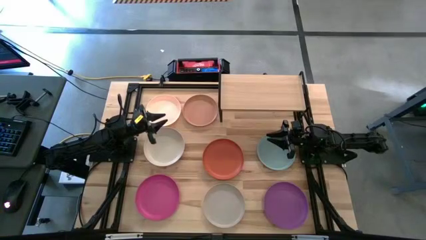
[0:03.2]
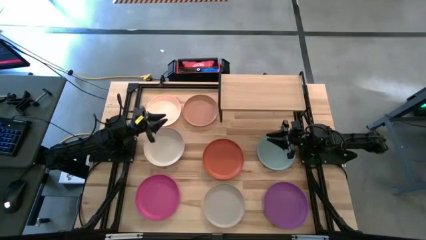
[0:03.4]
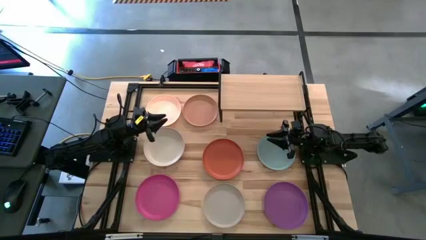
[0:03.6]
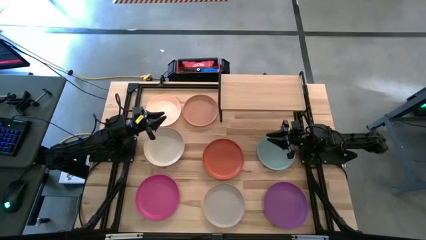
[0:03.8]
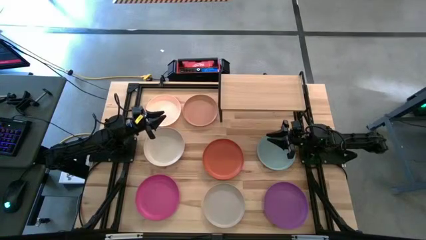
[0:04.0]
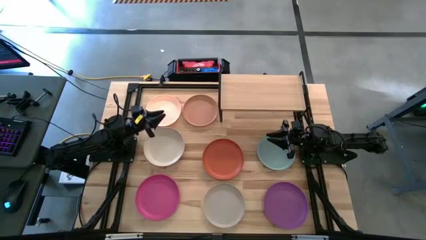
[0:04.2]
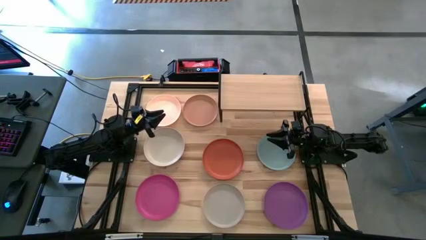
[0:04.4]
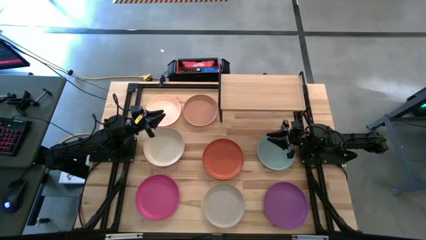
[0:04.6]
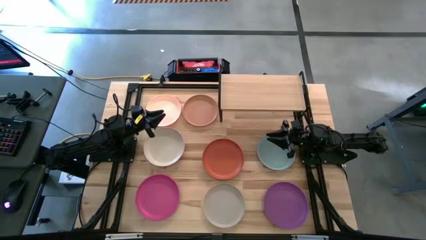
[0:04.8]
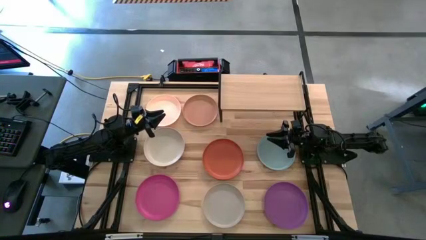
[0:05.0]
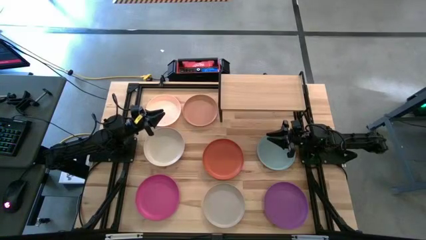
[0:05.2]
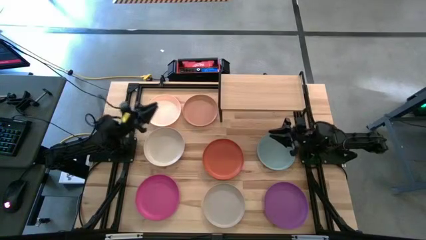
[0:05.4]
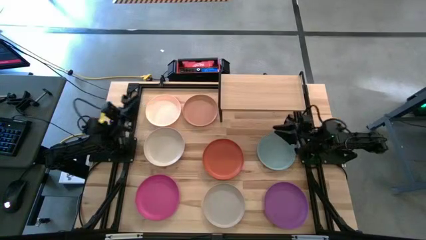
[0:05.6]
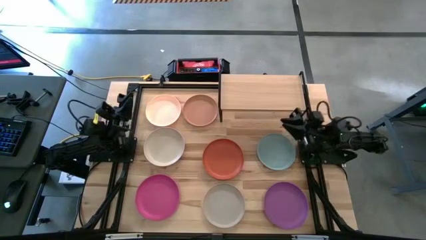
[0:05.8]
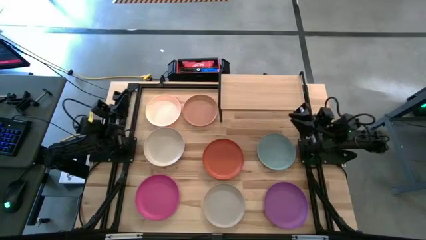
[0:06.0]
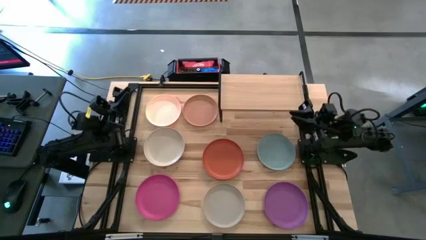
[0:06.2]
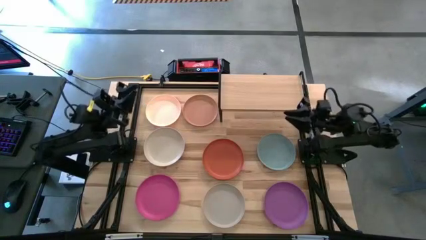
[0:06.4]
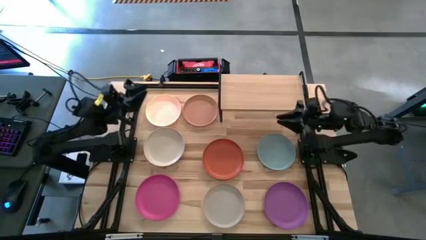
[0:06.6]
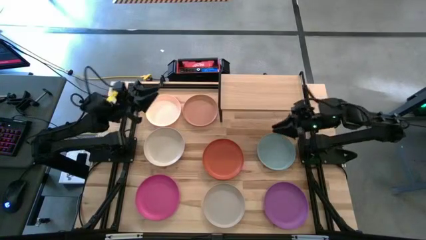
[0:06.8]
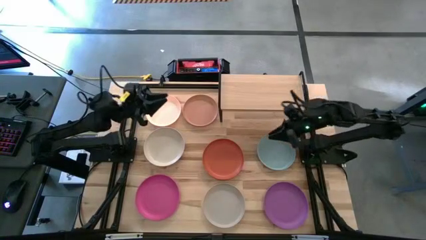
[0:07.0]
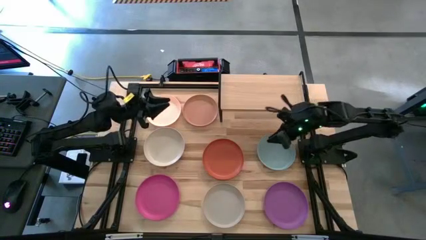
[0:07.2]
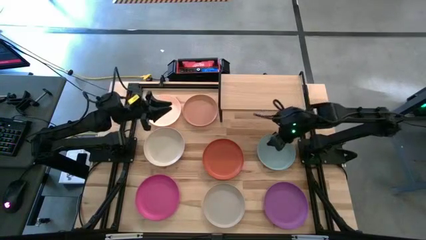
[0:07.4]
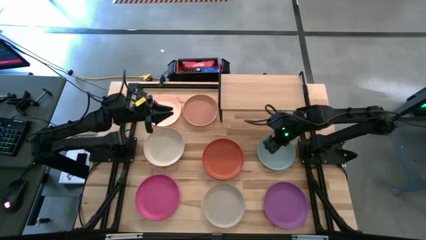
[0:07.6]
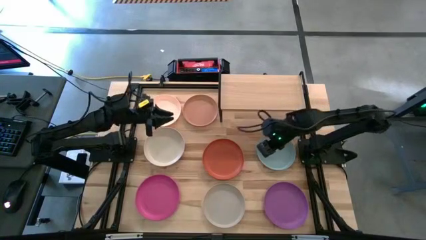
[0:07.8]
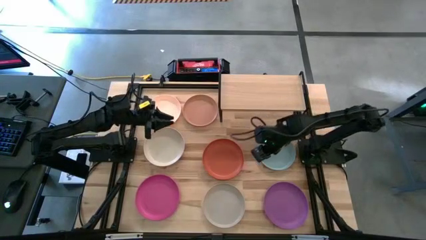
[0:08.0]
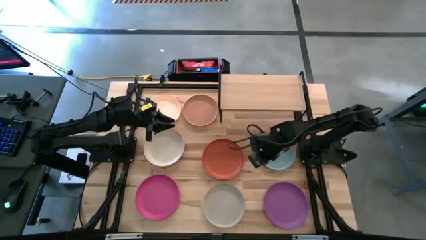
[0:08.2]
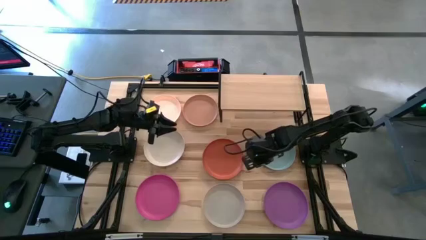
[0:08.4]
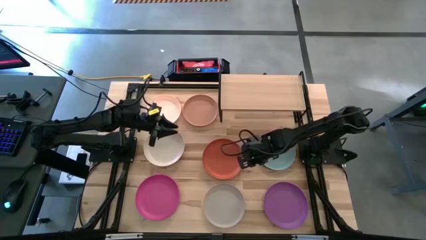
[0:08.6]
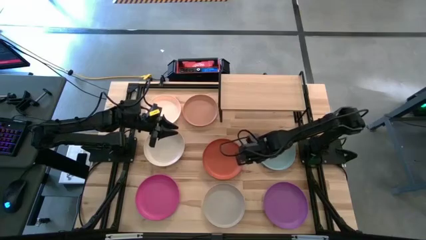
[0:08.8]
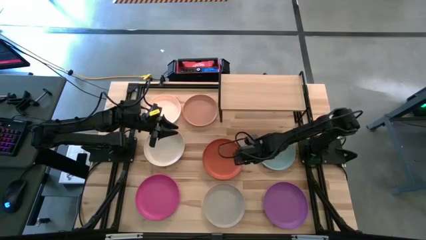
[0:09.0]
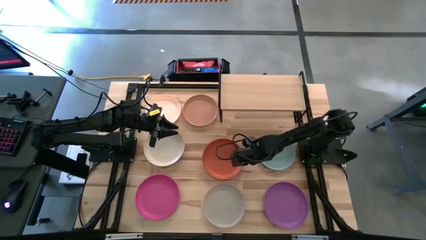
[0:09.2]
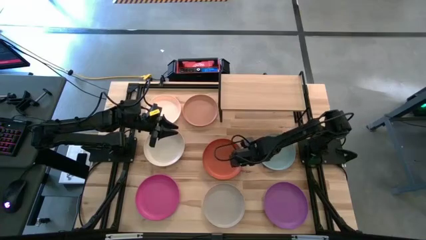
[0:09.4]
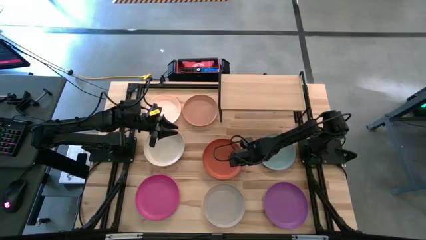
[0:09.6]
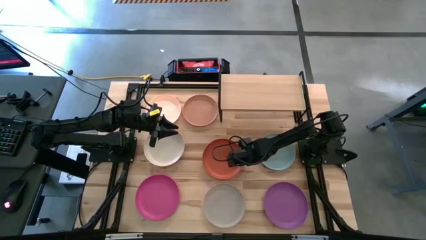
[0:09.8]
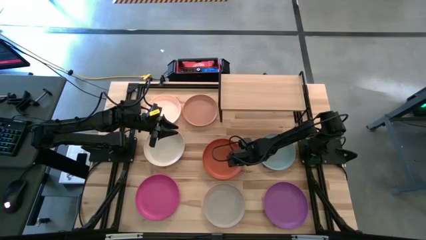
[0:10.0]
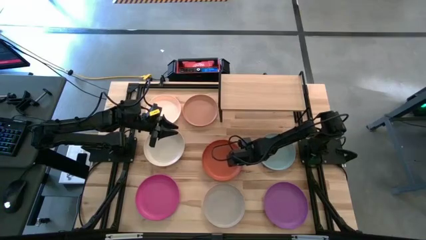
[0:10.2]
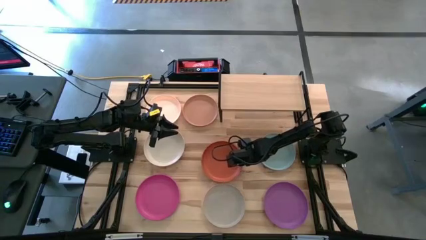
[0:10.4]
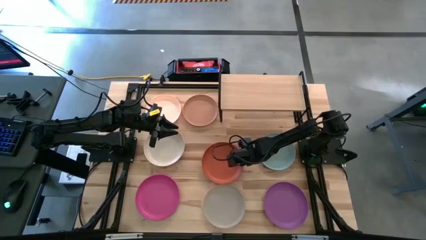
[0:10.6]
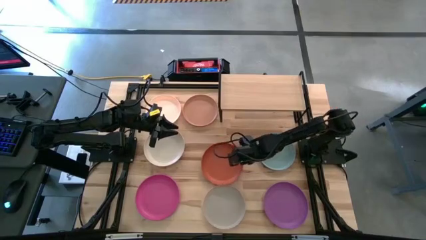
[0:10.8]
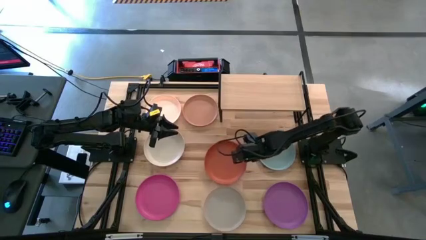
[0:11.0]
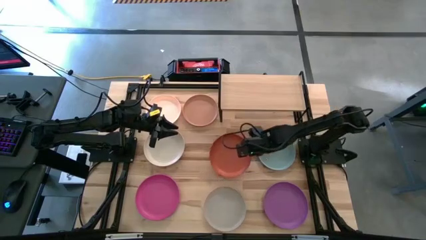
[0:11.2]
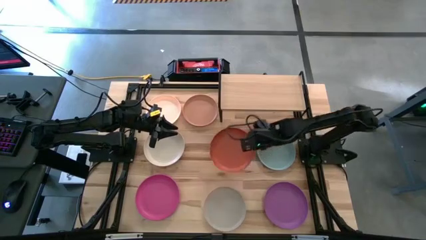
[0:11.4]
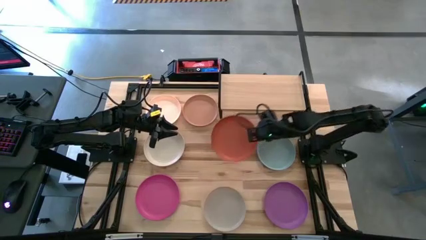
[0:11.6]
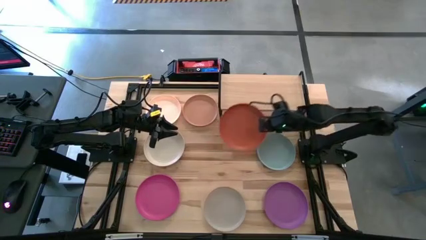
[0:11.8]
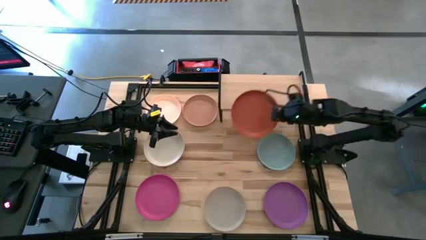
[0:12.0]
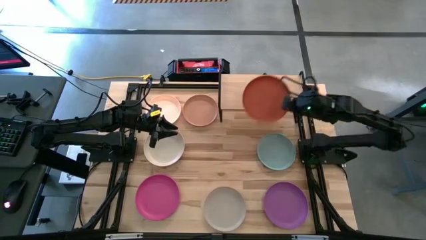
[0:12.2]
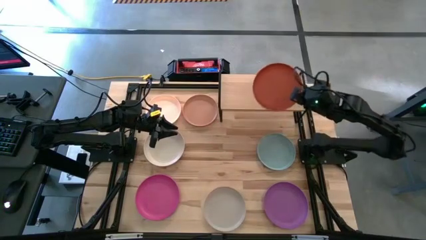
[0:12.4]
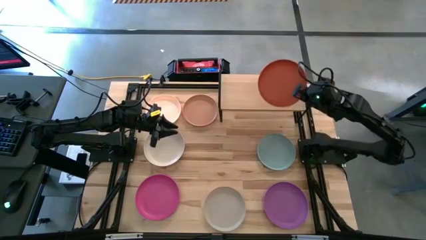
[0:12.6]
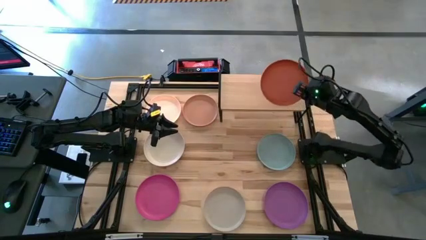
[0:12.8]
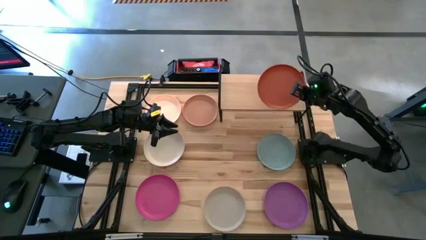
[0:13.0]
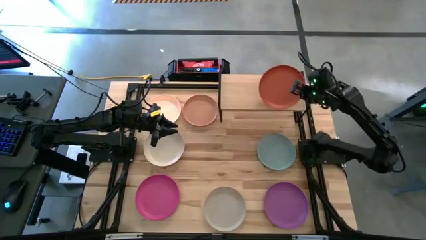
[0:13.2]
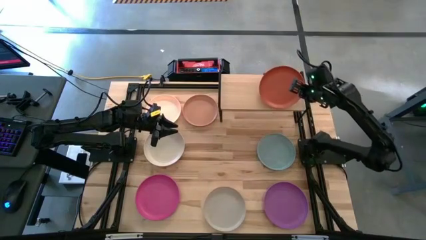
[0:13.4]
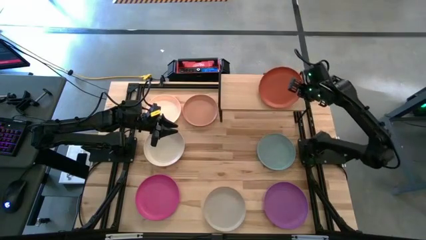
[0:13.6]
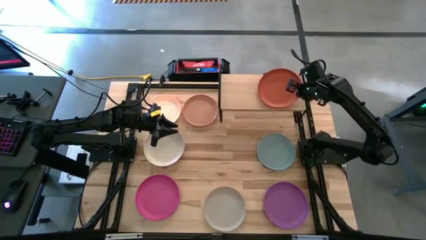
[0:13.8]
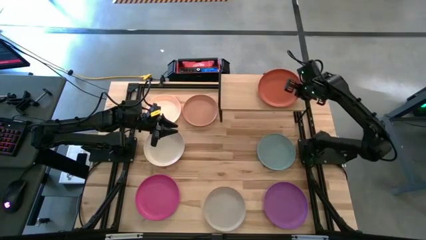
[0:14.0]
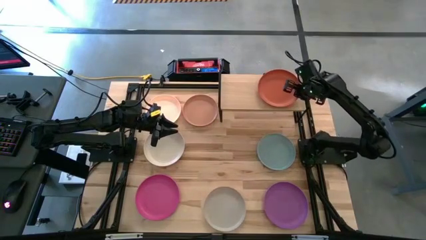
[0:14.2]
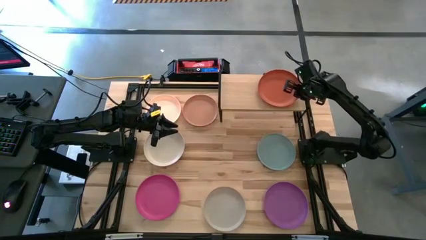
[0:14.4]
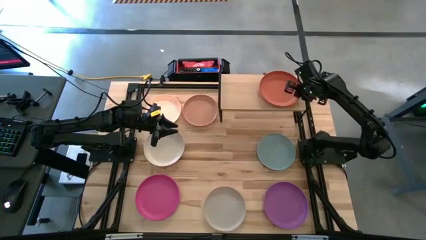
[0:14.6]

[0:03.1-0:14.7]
Task: Place and stack plates onto a shelf
Put the orange plate on the shelf
